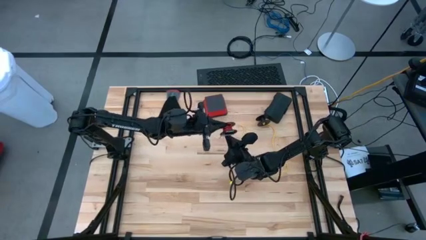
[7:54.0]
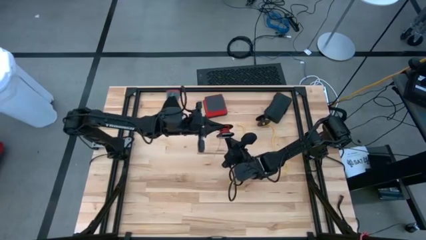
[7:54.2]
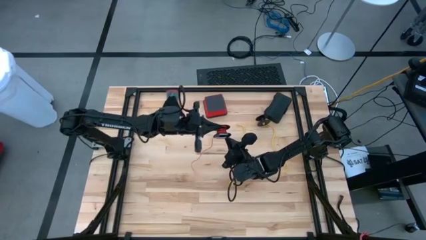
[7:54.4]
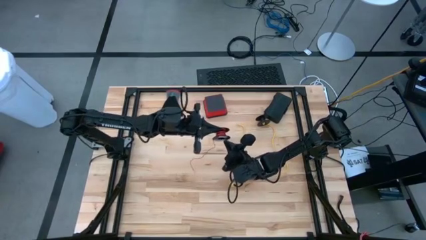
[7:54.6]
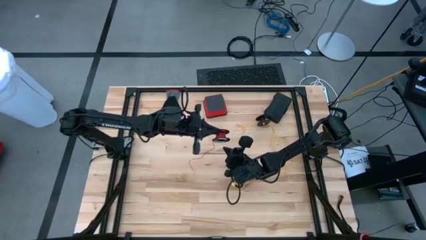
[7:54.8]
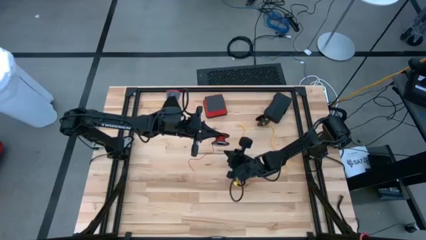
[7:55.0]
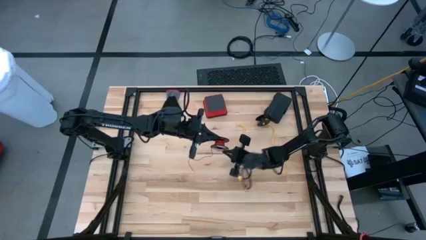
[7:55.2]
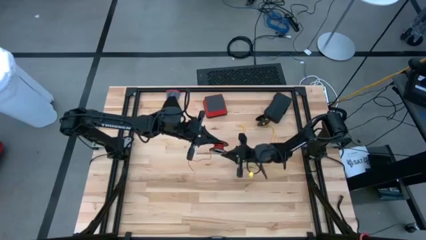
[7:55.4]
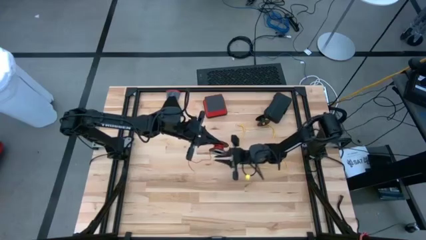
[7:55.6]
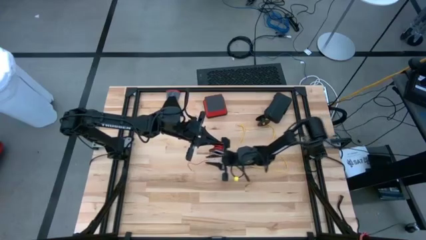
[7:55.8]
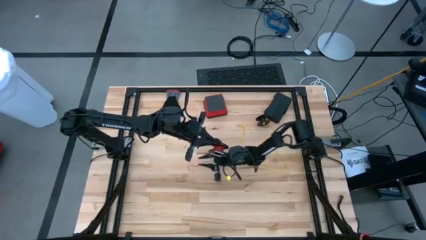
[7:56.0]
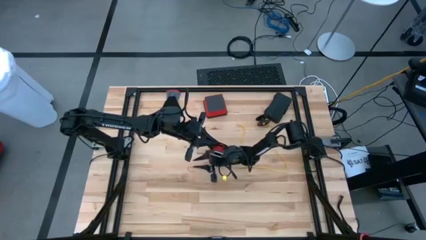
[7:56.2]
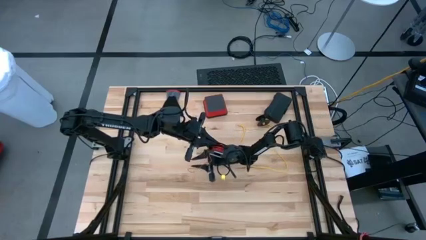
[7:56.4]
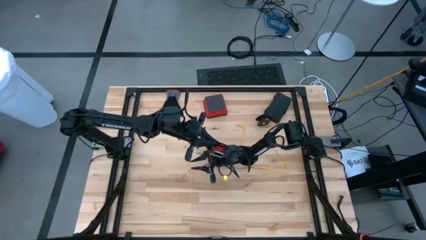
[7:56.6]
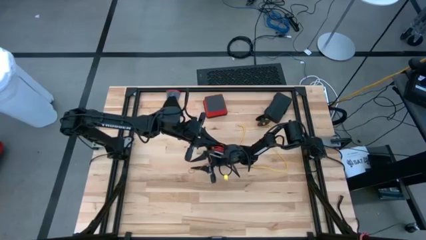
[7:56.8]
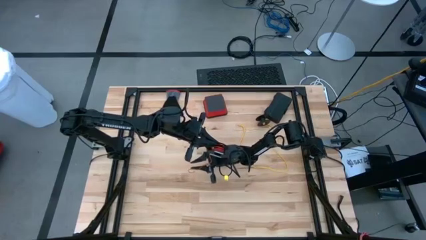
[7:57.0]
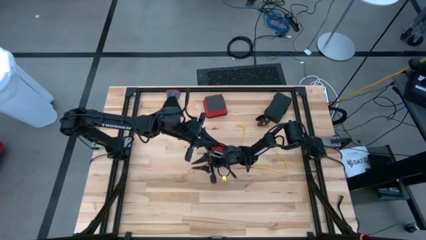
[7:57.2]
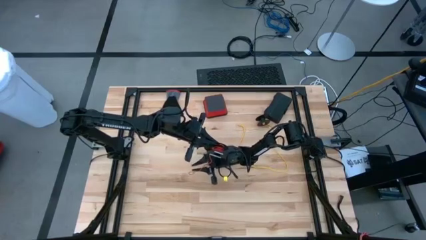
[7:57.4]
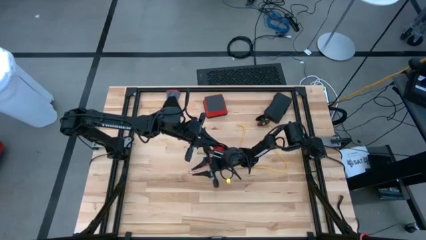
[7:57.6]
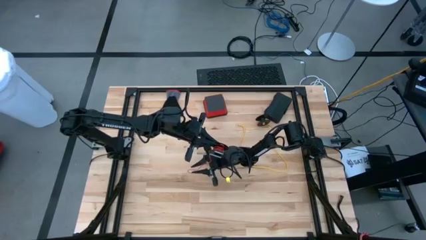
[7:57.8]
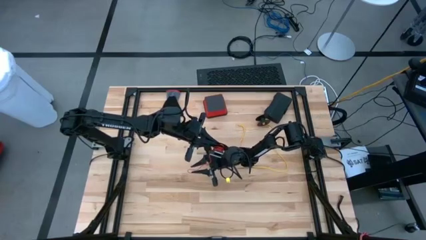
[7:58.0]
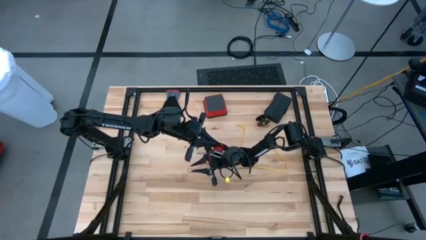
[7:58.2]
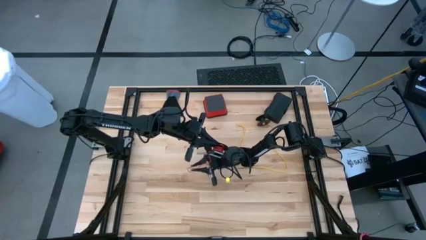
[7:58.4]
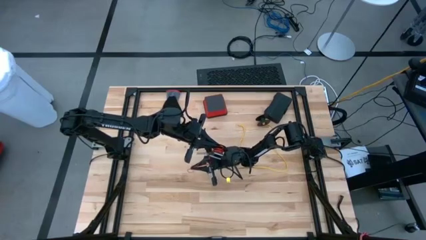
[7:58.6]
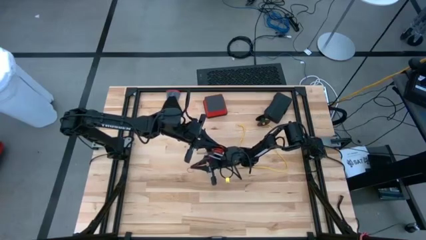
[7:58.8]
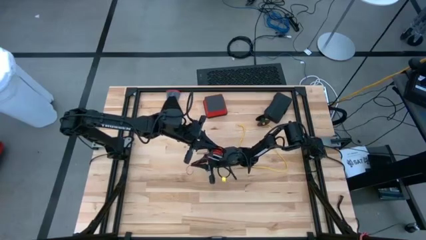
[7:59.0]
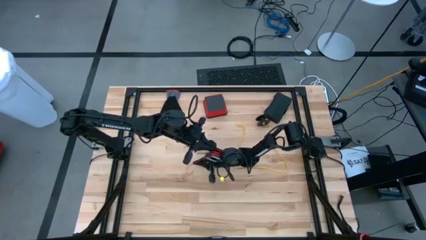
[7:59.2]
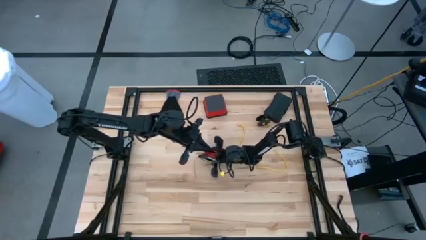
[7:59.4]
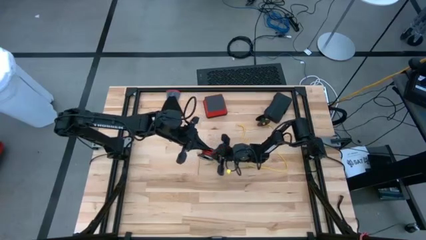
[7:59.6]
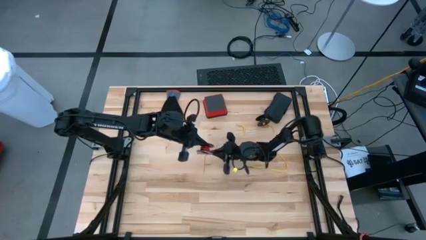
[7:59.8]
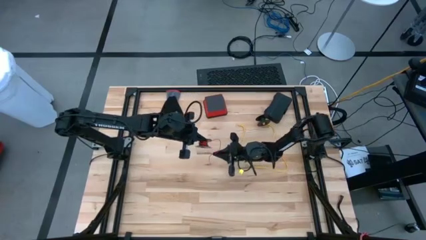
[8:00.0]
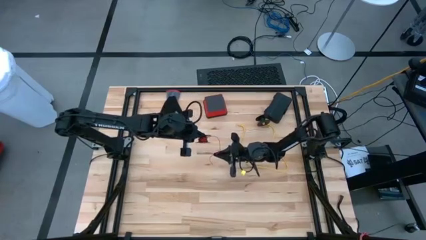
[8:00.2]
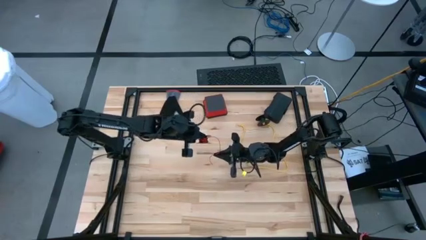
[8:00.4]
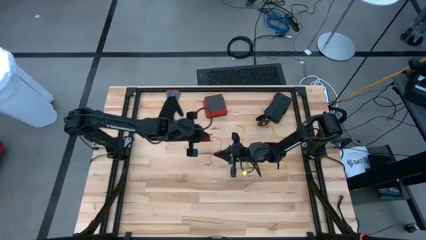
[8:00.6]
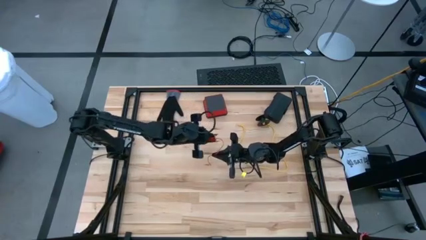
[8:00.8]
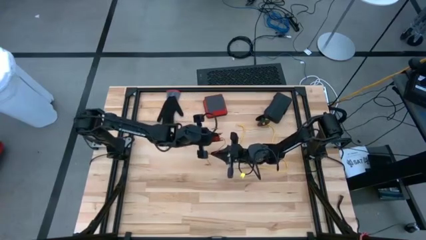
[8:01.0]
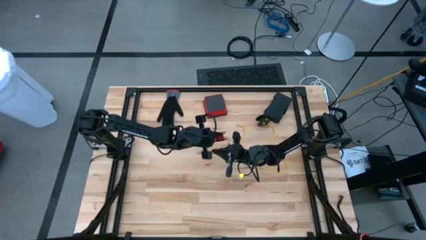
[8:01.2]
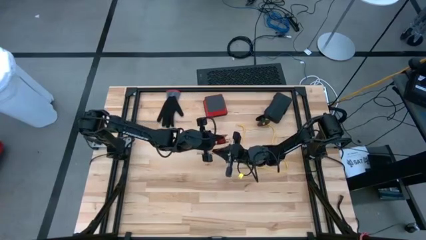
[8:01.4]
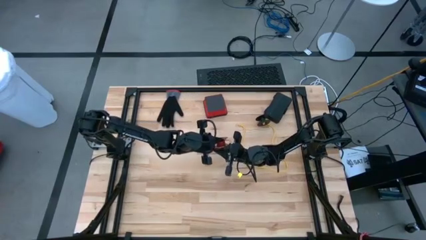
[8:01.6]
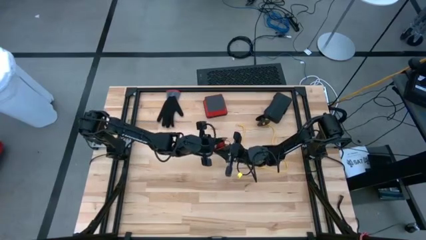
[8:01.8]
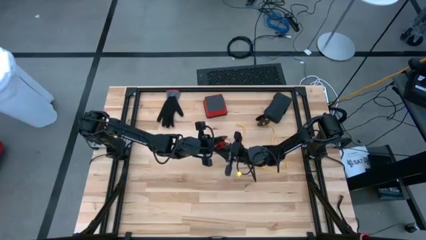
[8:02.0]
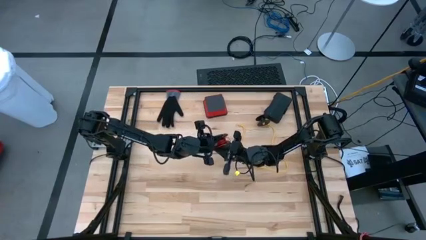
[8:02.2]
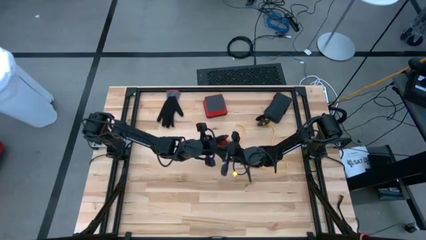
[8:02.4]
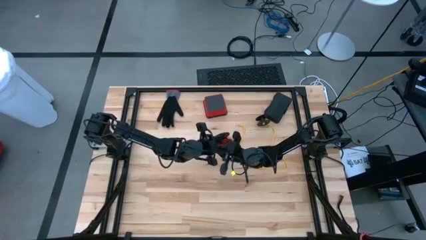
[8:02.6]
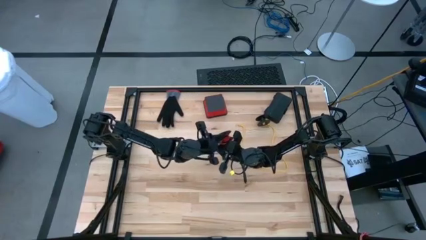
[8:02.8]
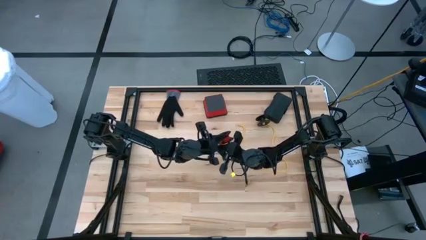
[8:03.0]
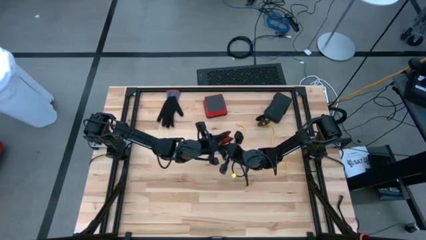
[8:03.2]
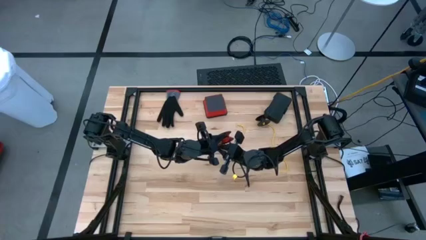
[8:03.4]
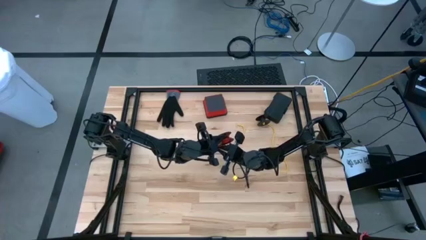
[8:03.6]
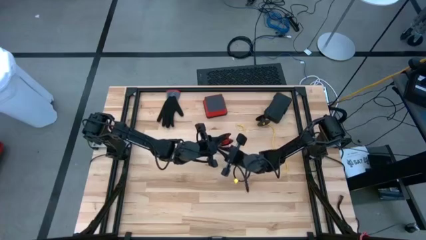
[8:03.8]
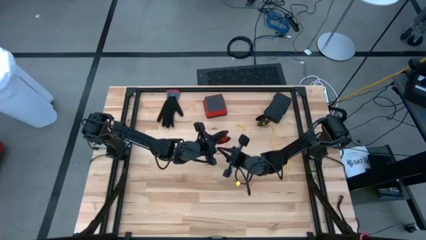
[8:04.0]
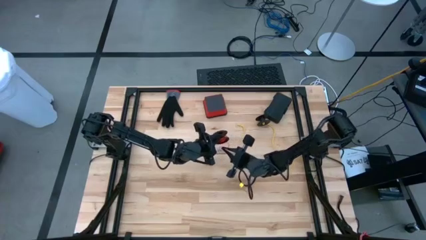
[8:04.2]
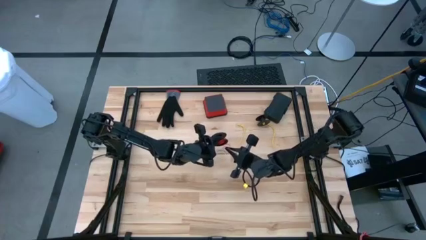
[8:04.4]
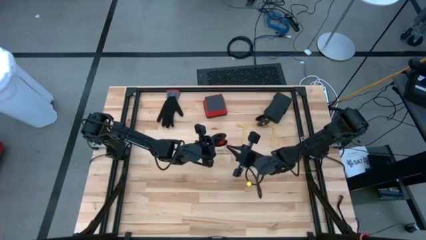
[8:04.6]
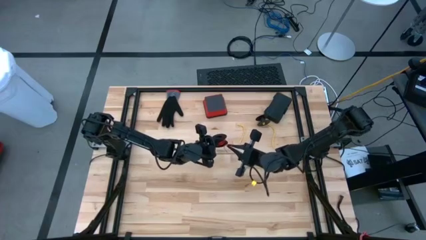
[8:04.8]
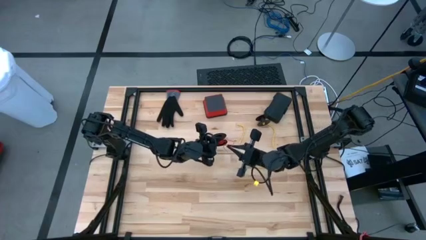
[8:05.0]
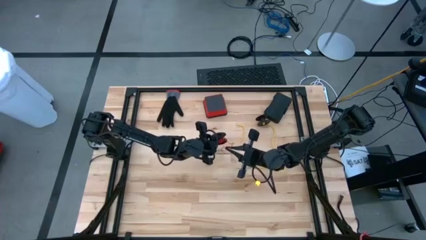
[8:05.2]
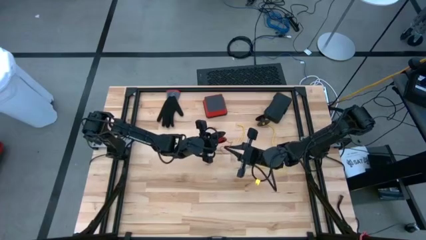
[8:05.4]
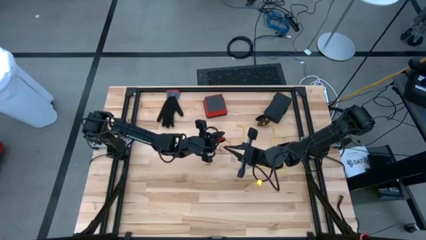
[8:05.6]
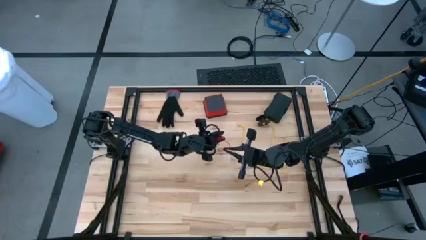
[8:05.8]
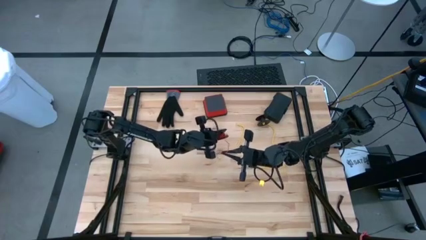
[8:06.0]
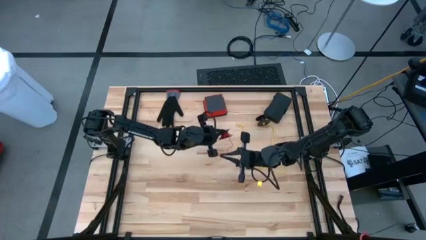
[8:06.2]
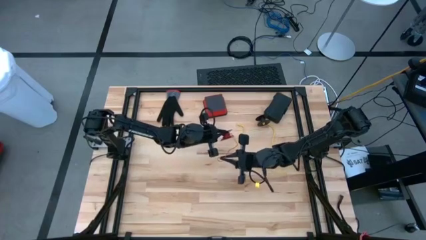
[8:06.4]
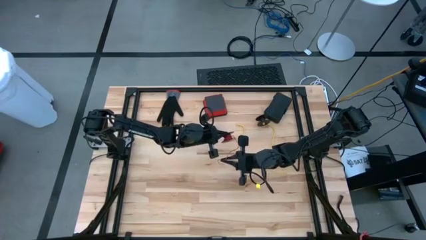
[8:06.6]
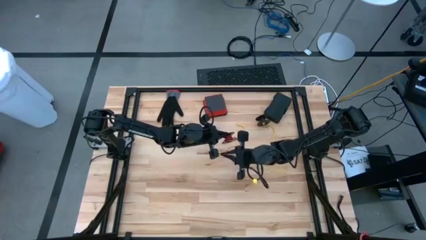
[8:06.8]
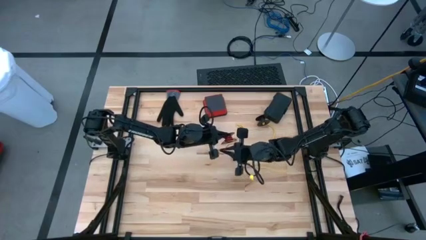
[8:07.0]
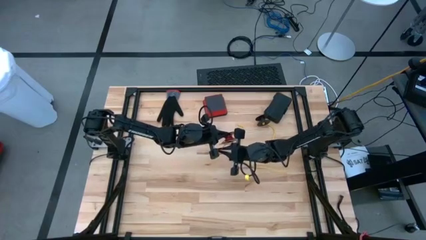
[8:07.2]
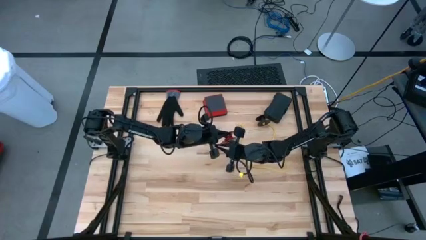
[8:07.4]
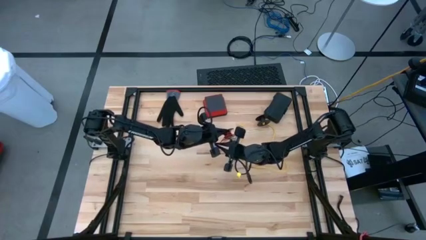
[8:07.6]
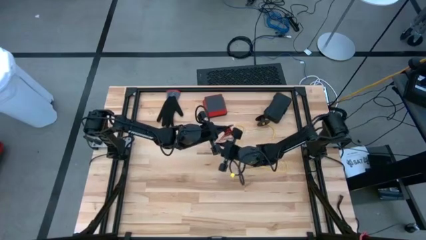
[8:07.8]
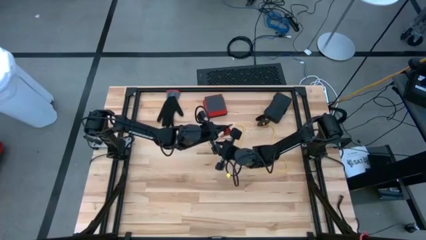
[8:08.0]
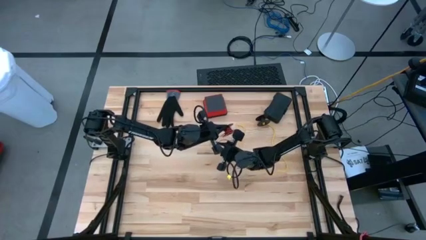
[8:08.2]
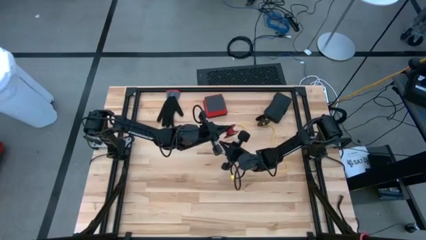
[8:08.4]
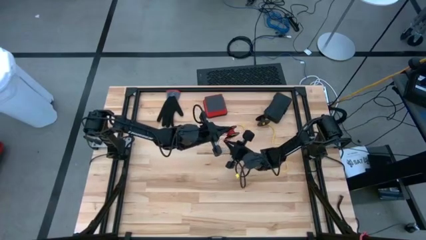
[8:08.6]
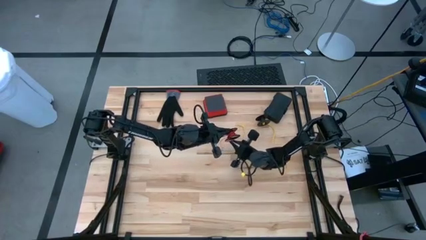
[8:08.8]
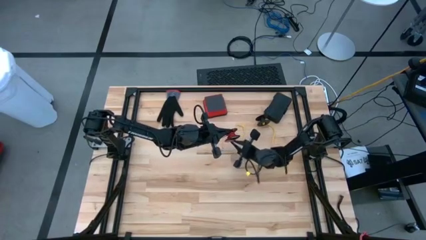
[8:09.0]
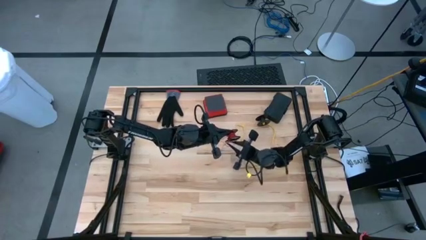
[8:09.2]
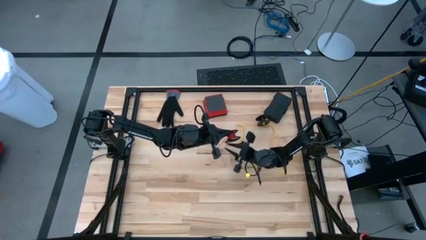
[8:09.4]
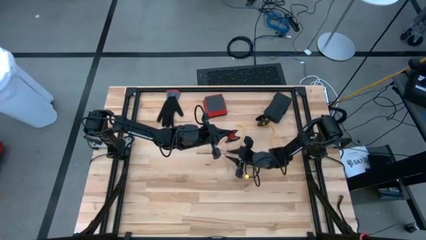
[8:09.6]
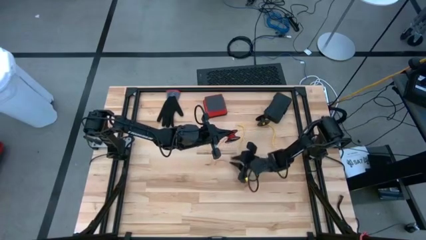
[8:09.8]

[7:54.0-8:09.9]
Task: Coil cords
Coil the red wire onto the spool
